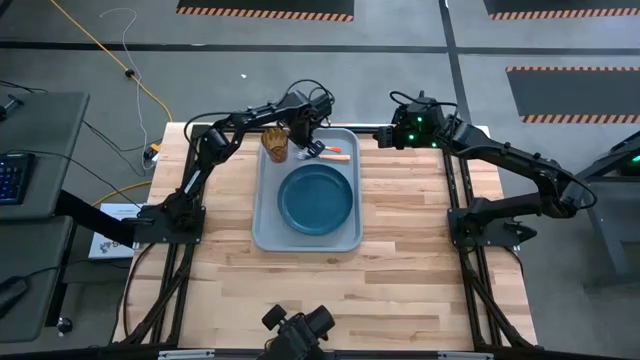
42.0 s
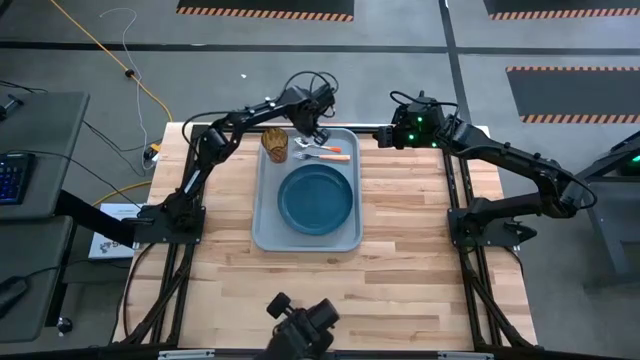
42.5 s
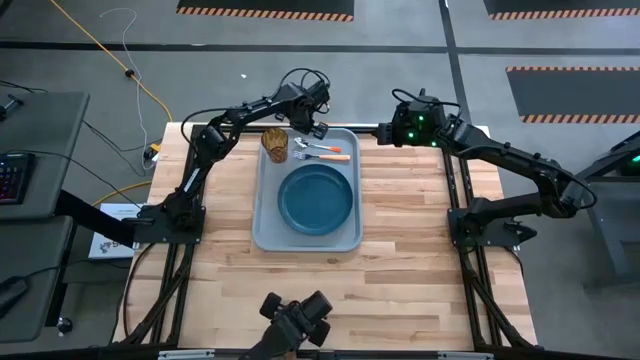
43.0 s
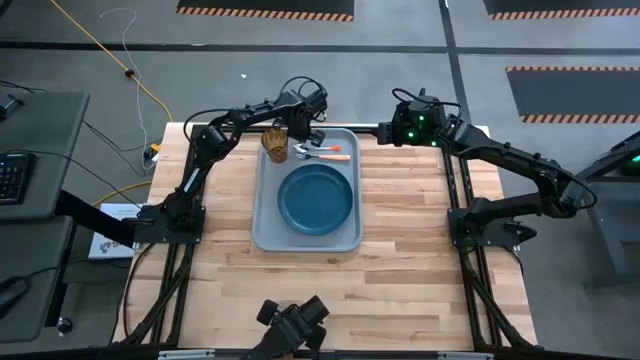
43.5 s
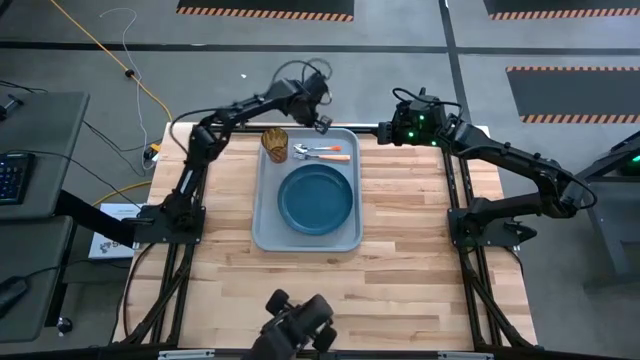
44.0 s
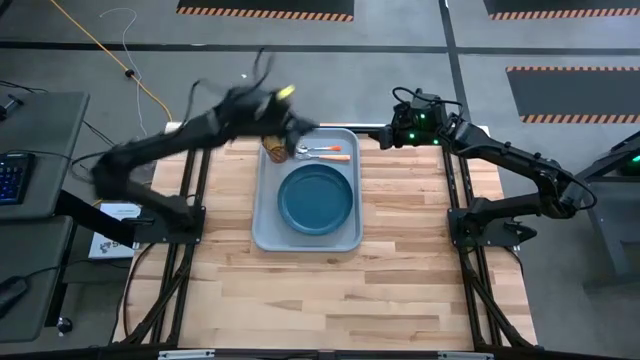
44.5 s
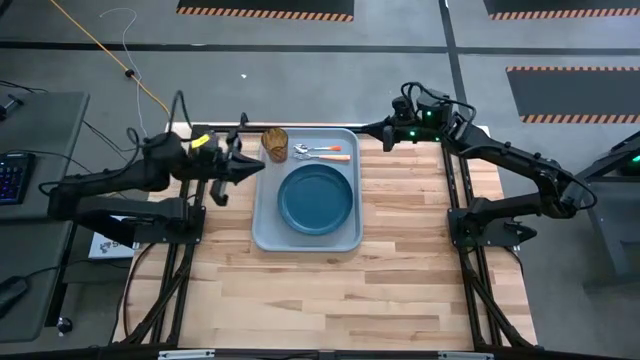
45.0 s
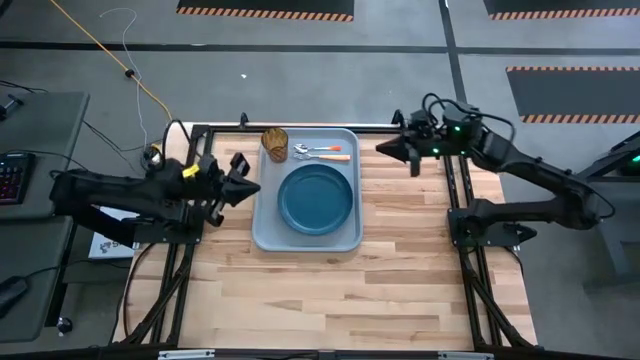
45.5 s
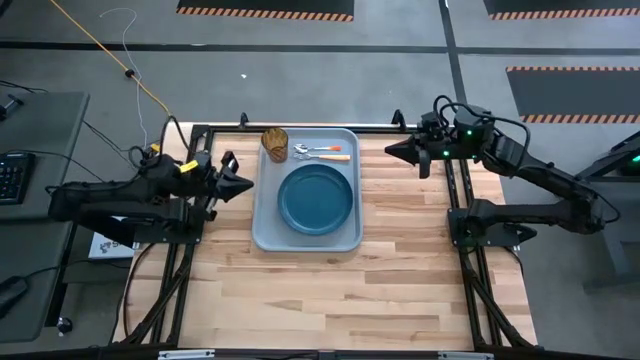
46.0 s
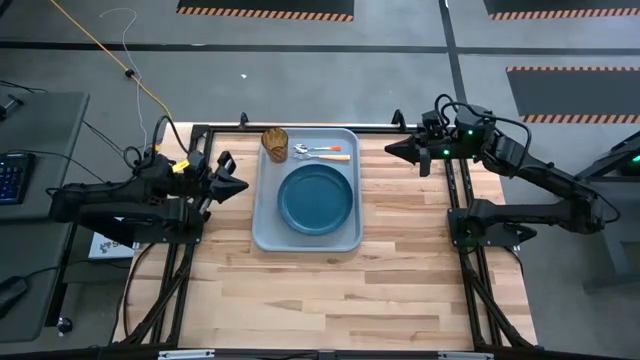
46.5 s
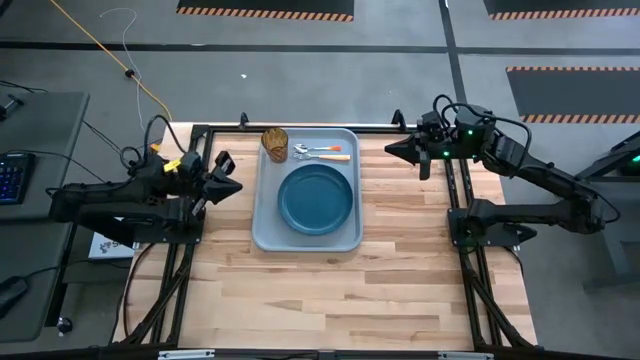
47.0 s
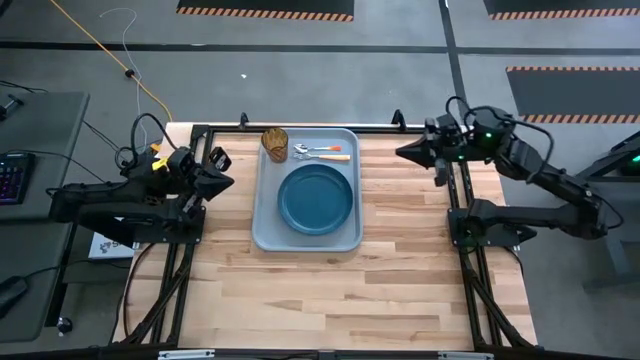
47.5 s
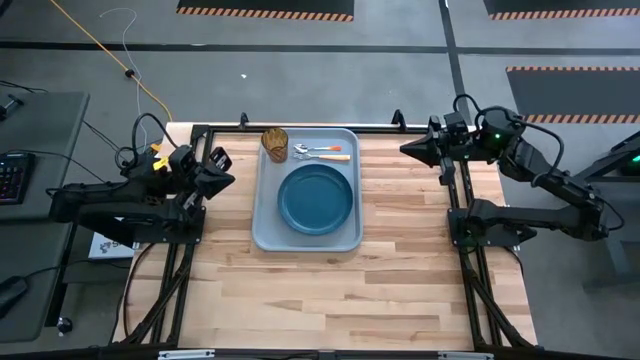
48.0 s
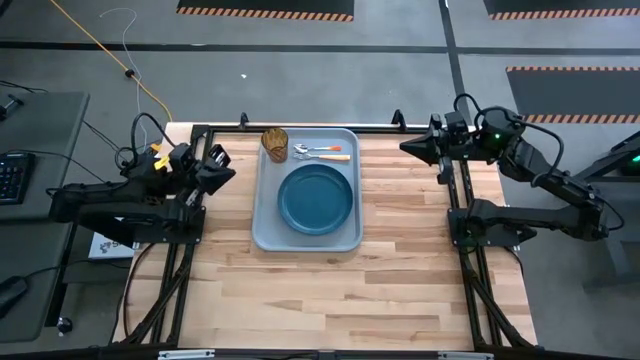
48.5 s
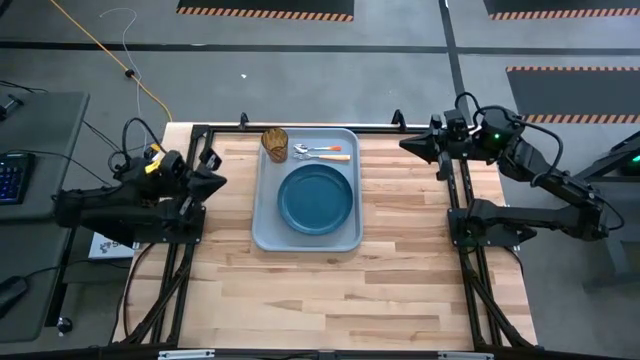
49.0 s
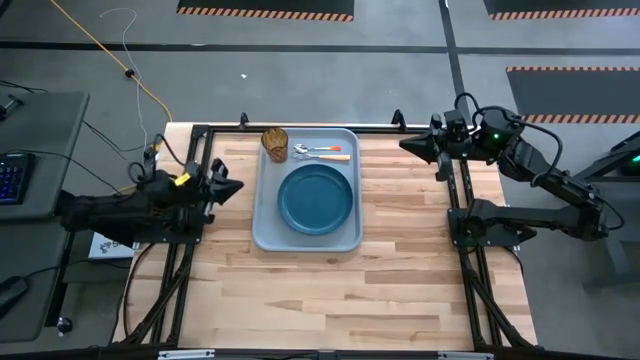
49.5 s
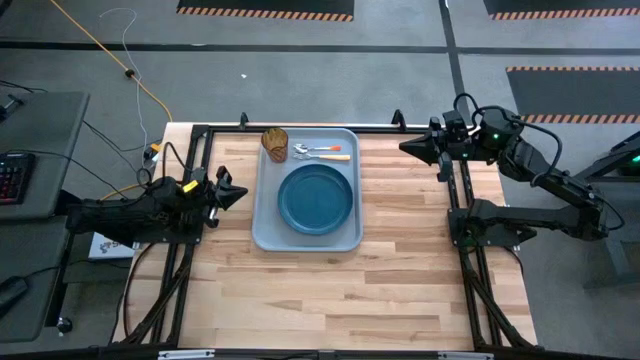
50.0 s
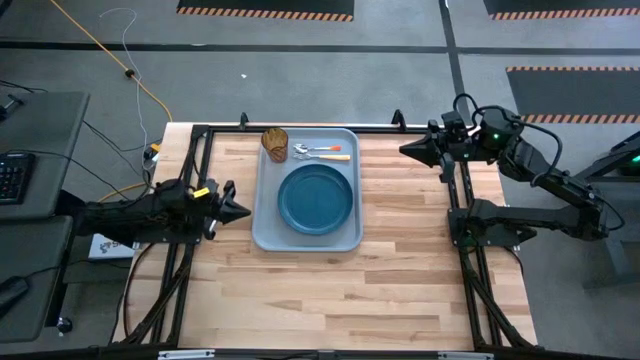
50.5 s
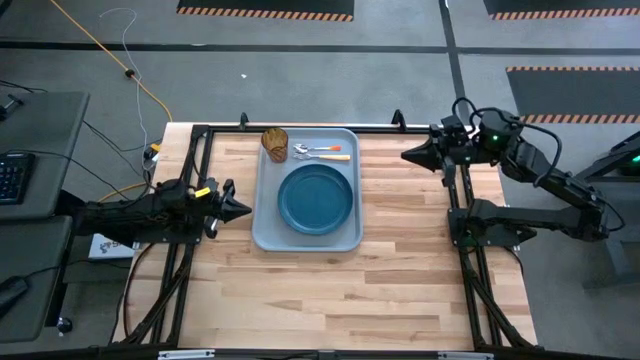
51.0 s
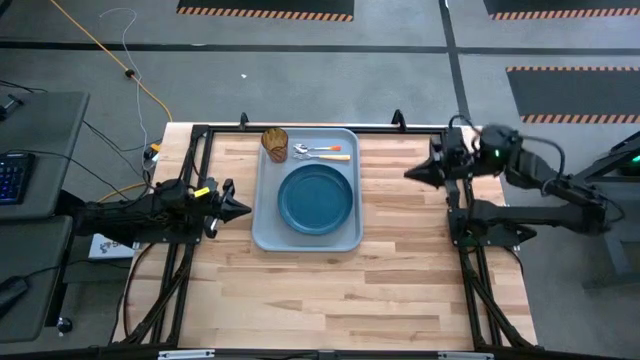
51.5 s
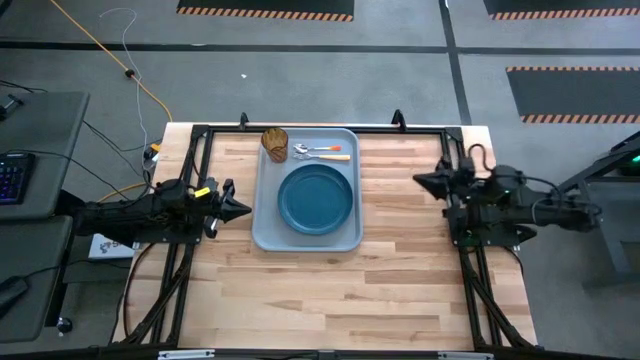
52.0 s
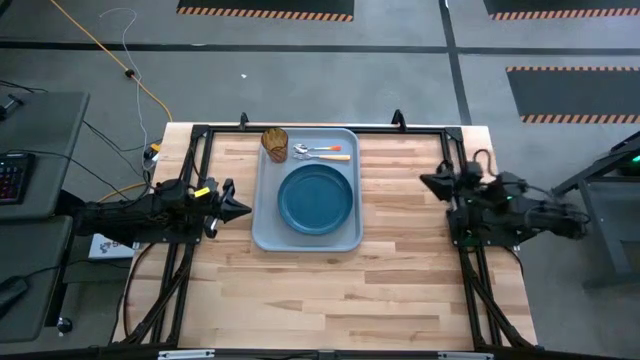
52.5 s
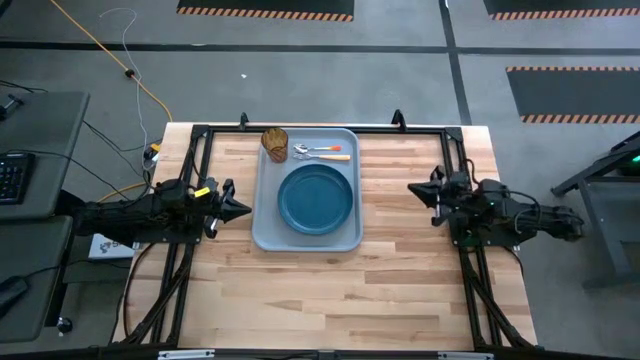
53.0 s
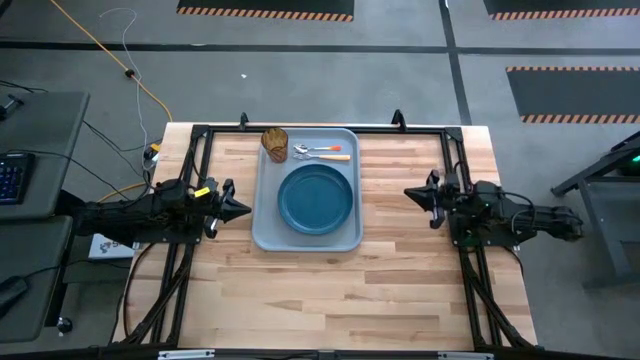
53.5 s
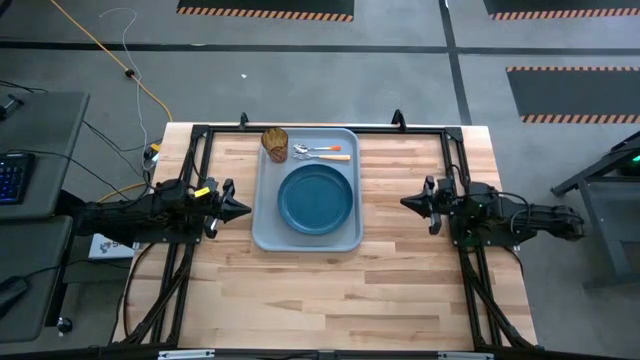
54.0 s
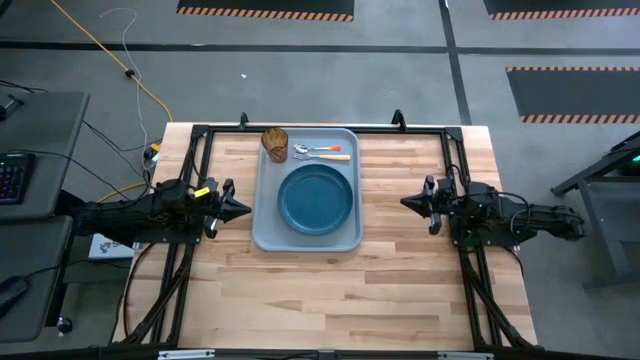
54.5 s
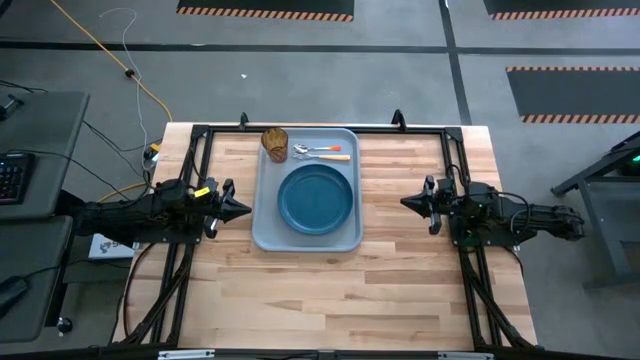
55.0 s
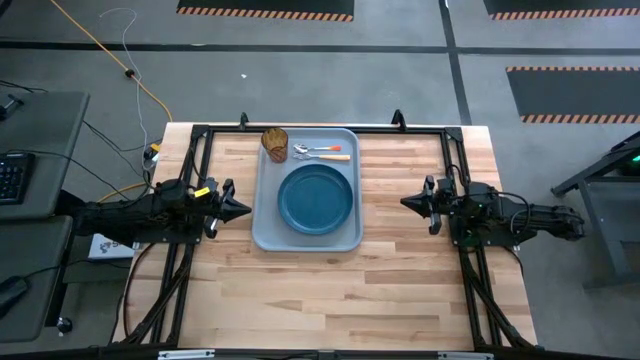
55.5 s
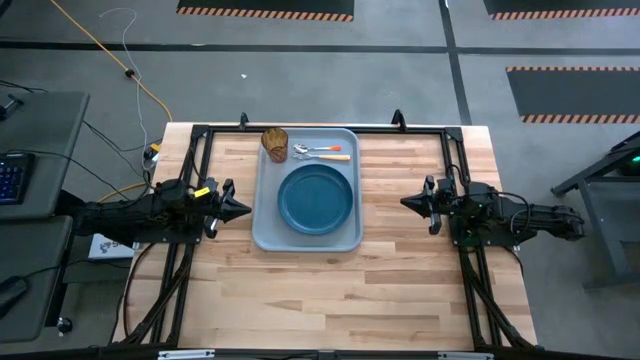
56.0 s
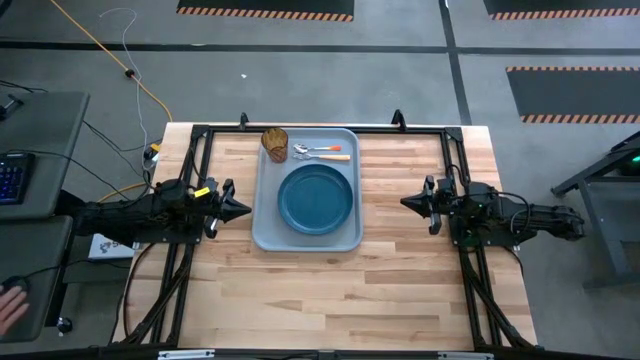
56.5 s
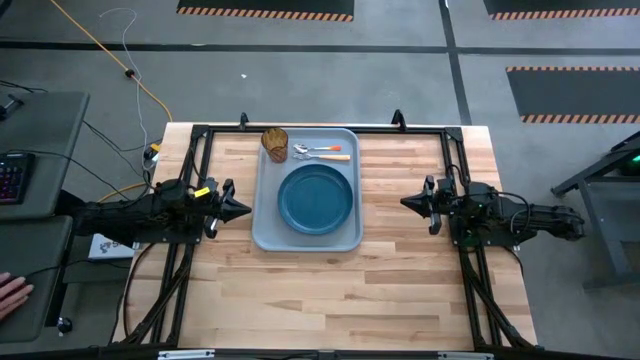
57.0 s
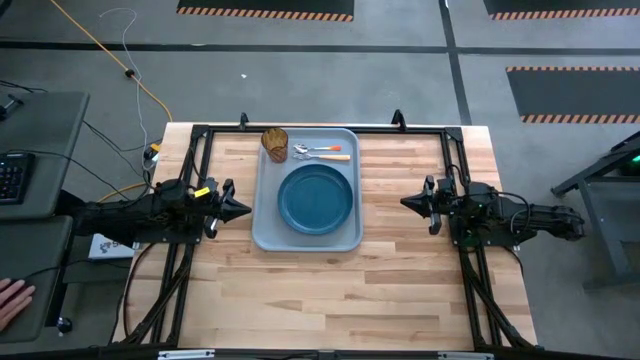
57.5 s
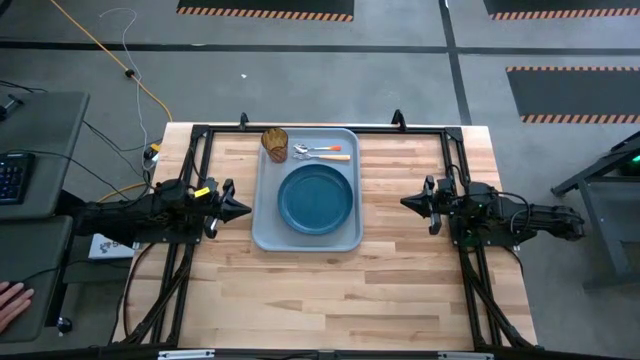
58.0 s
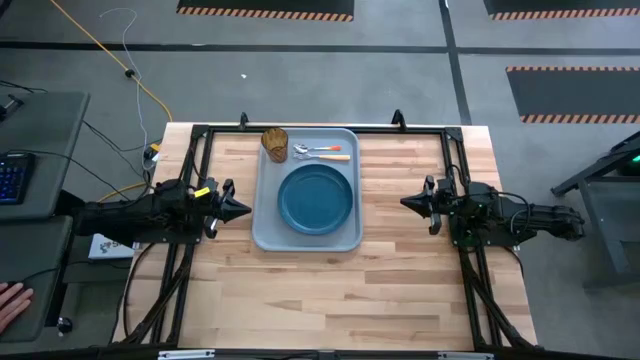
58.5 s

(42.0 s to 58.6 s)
Task: Pick and place plate/cup/fork/spoon on tray
Return to Home Position

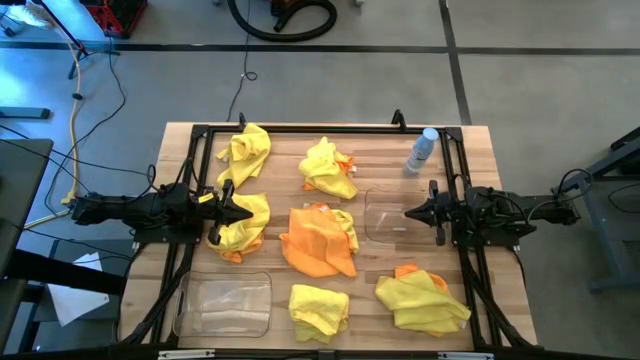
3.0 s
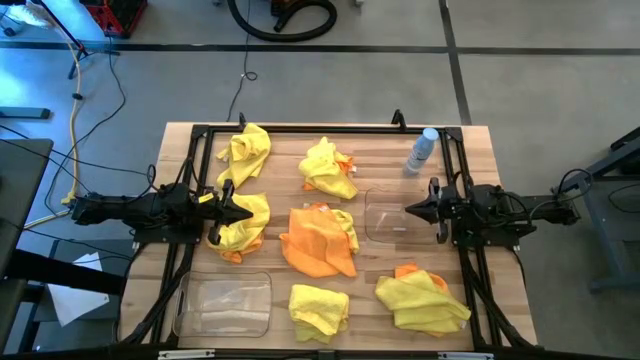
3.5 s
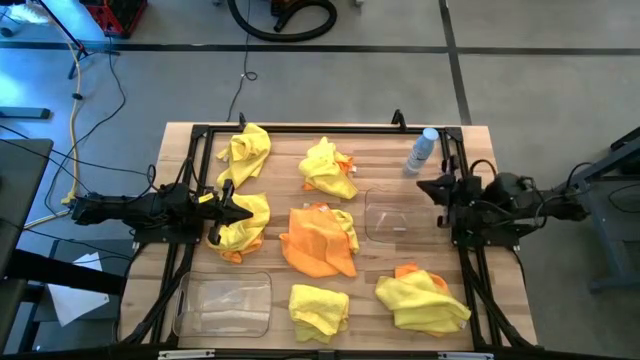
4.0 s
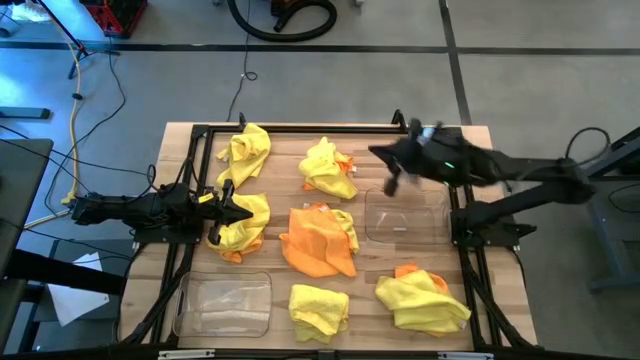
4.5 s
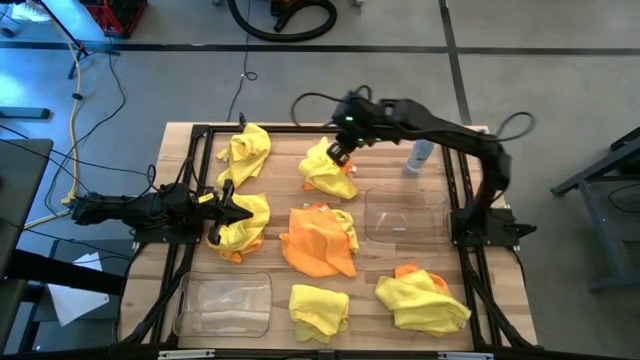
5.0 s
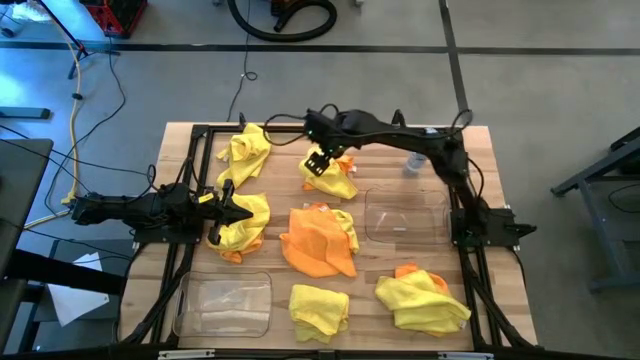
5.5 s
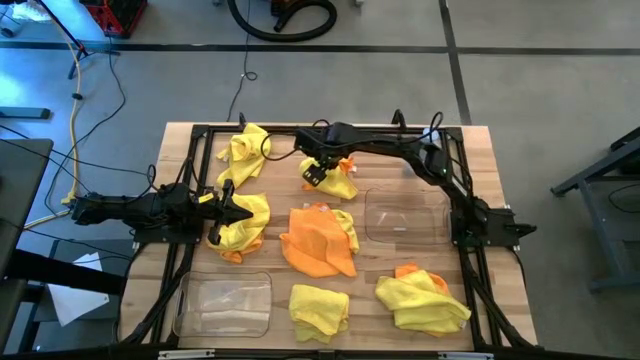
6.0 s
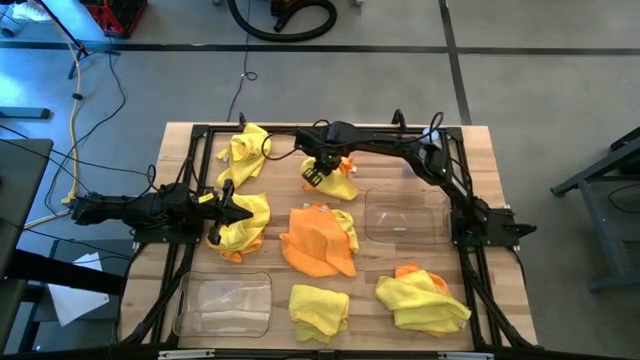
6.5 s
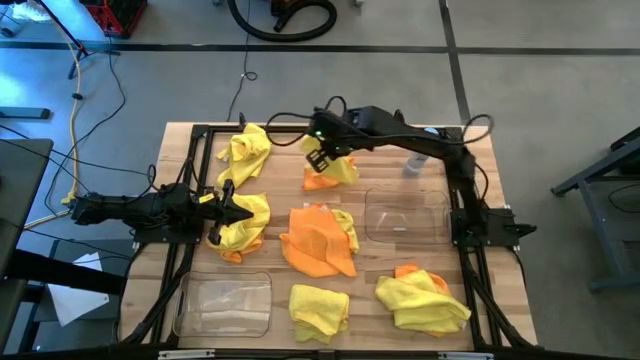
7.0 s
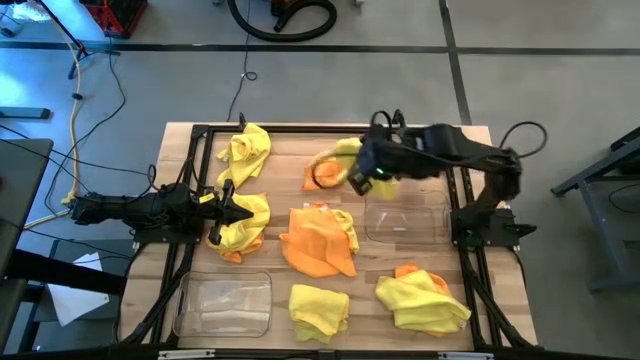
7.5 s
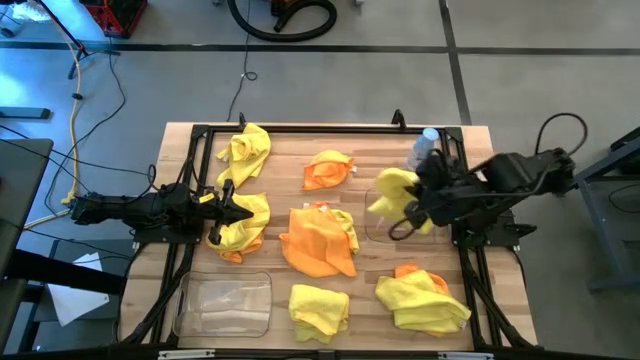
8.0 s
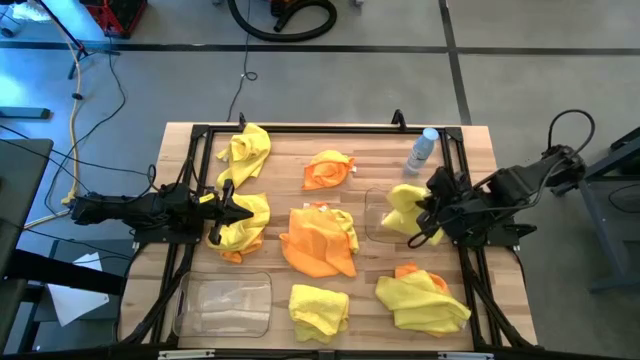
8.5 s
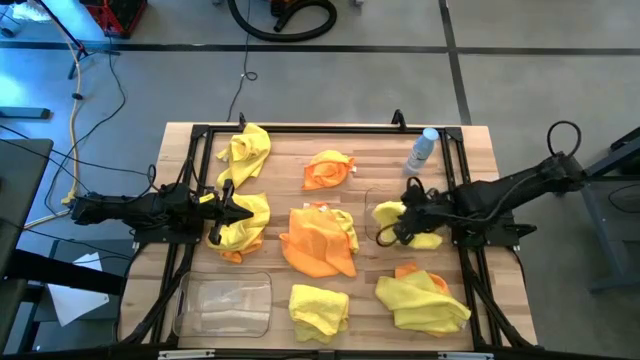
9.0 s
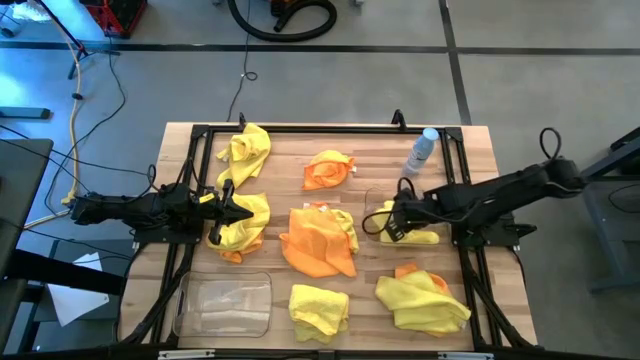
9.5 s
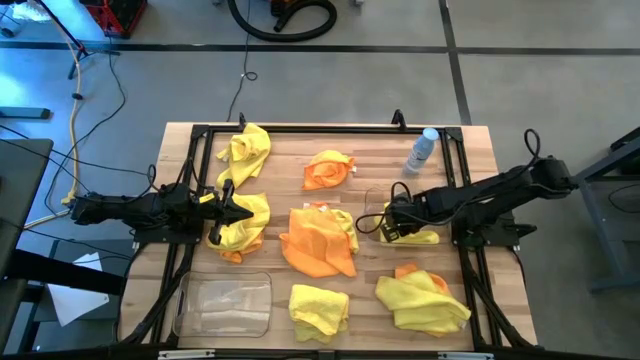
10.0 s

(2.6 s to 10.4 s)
Task: Sort microfiber towel by color & place in baskets
Put the yellow microfiber cloth into the right transparent bin
